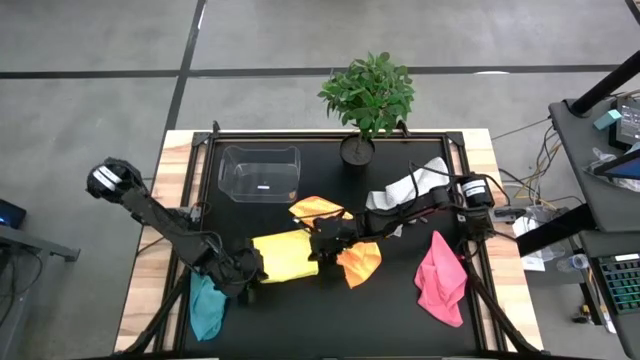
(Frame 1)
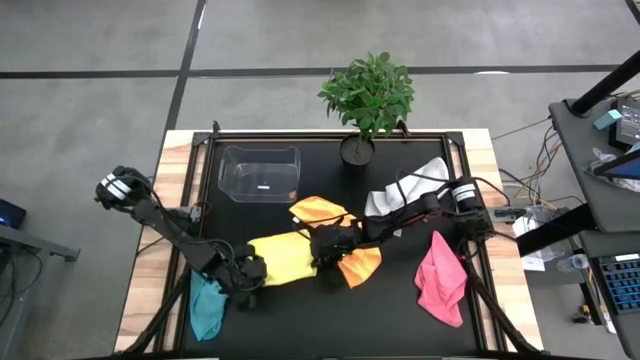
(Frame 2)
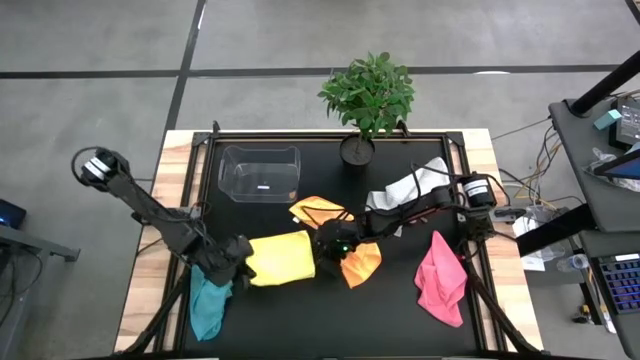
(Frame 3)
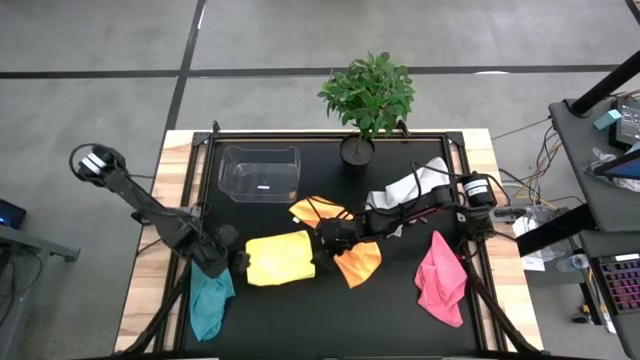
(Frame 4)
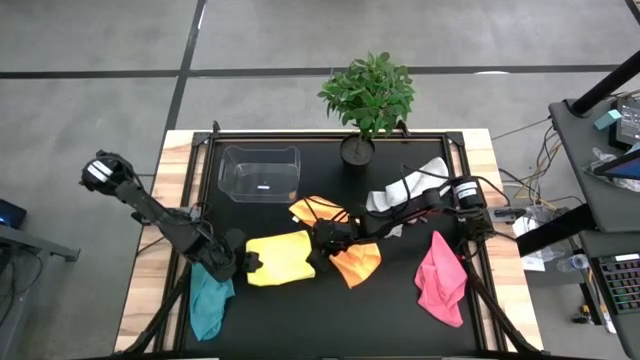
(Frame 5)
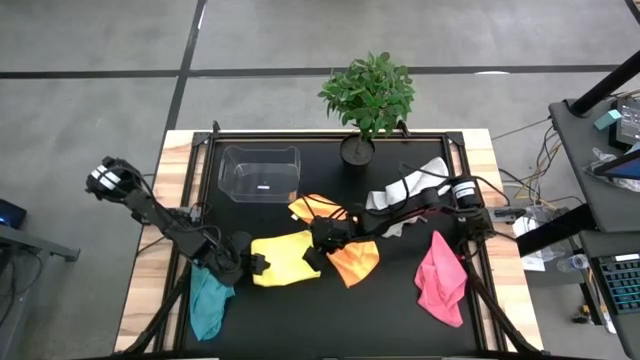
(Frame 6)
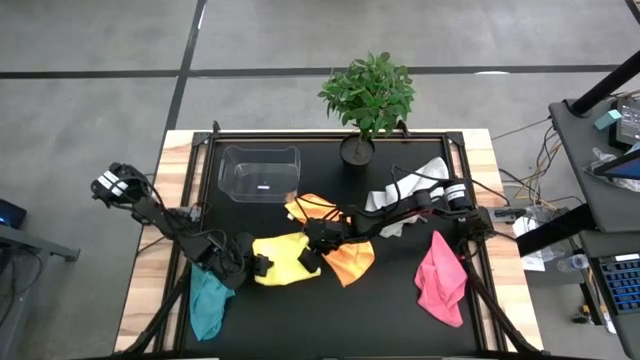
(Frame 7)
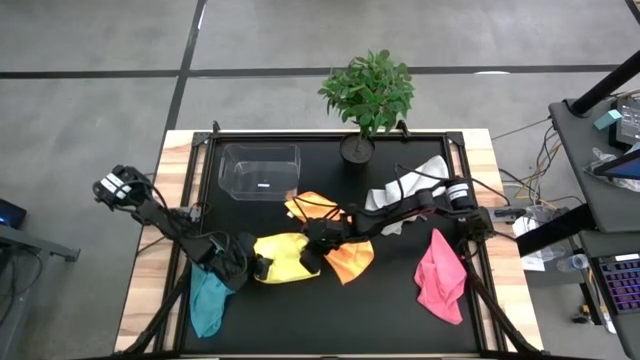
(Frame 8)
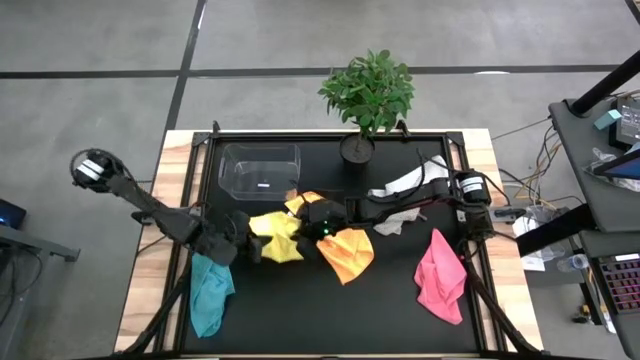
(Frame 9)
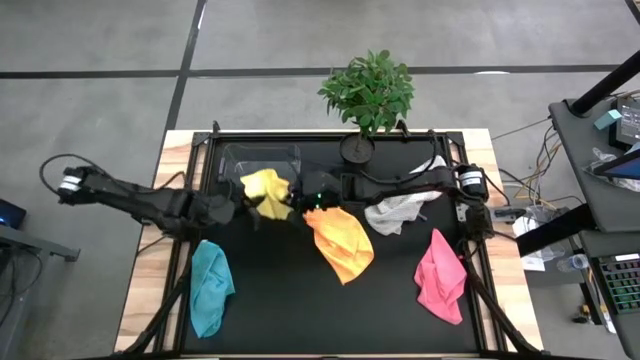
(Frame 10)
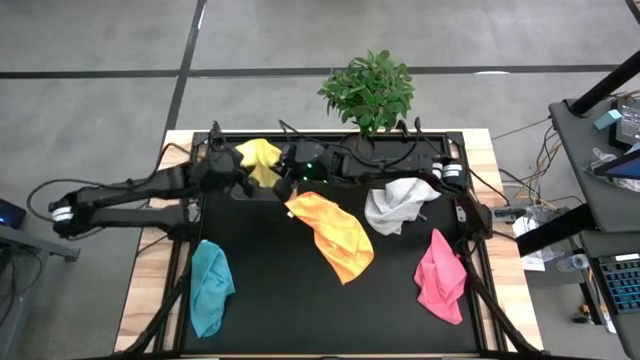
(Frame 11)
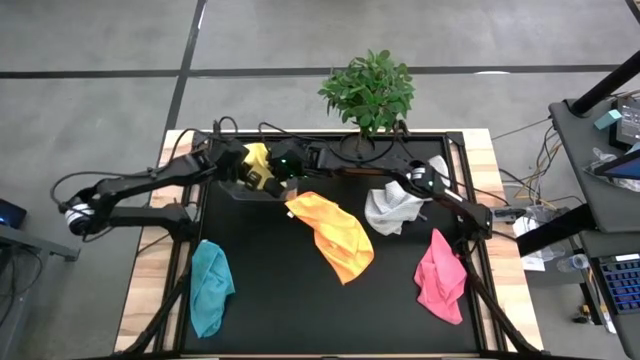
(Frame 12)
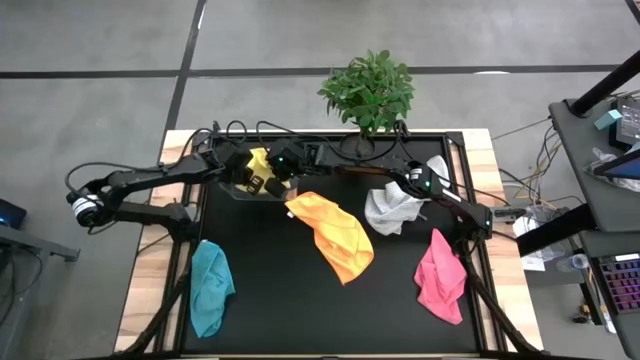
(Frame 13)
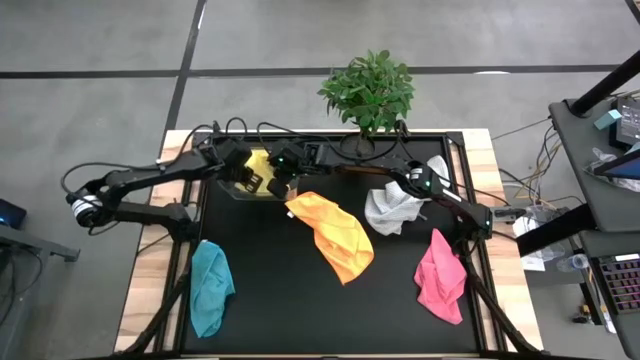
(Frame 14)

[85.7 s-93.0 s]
Task: Fold microfiber towels
Put the yellow towel into the transparent bin

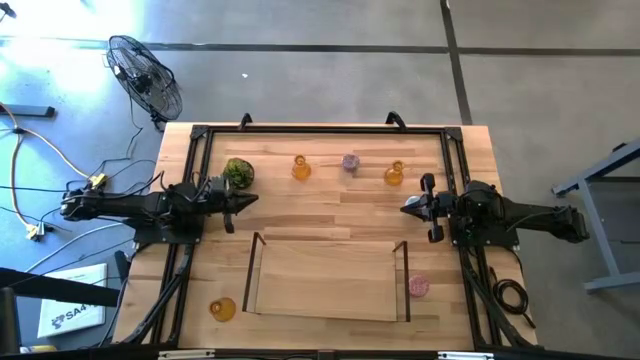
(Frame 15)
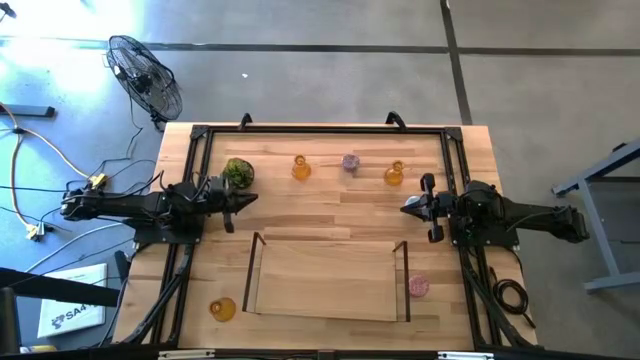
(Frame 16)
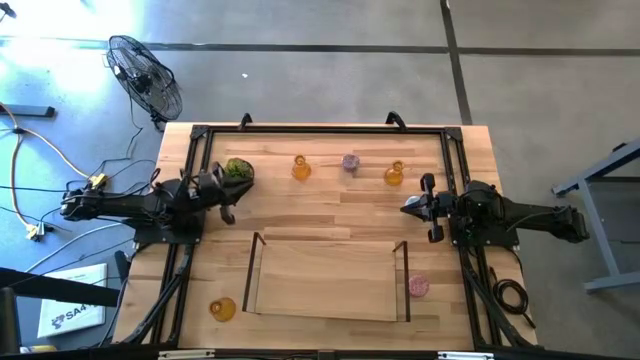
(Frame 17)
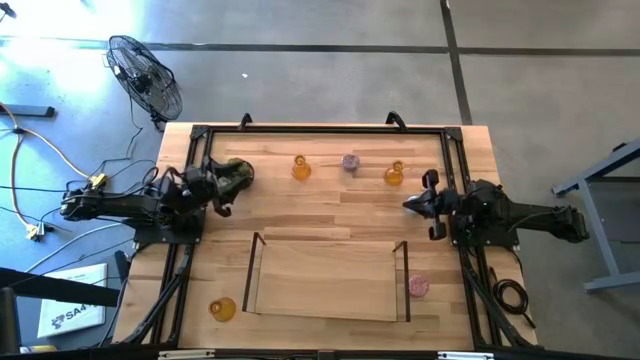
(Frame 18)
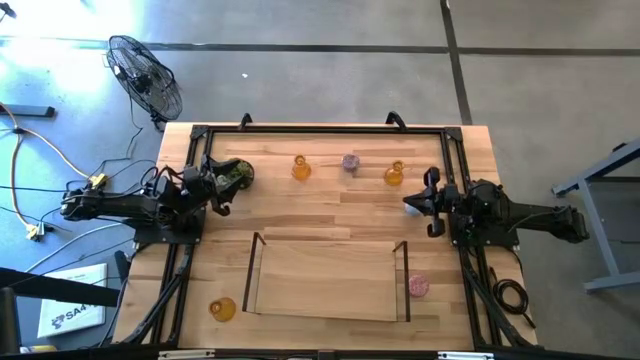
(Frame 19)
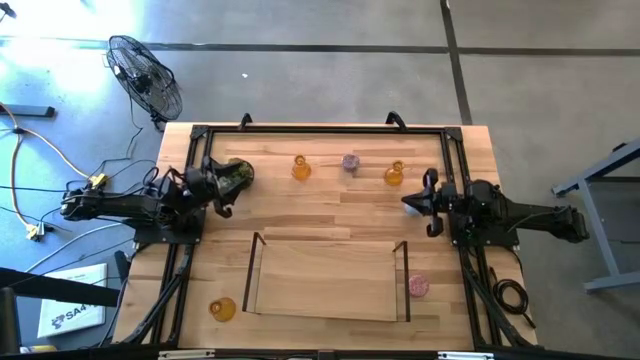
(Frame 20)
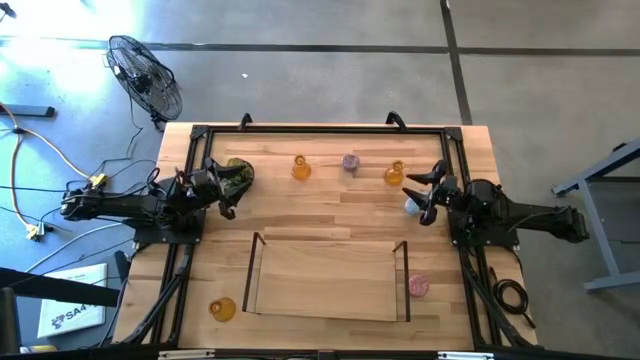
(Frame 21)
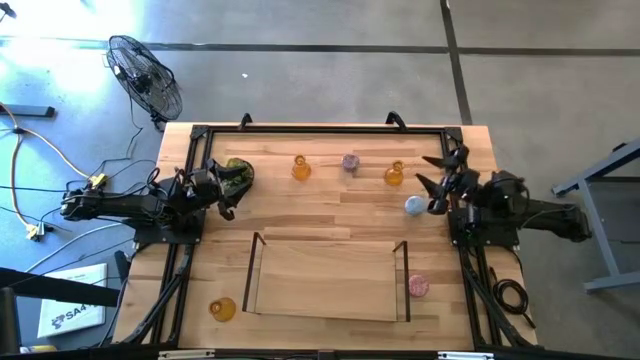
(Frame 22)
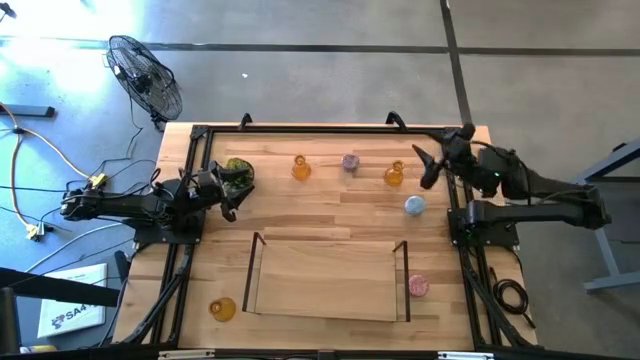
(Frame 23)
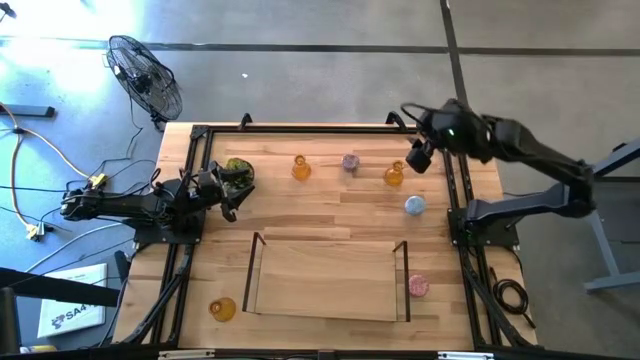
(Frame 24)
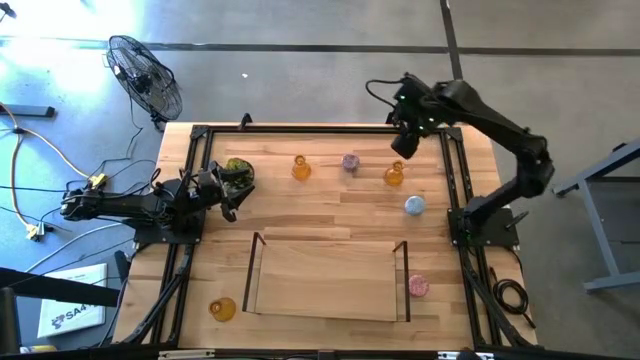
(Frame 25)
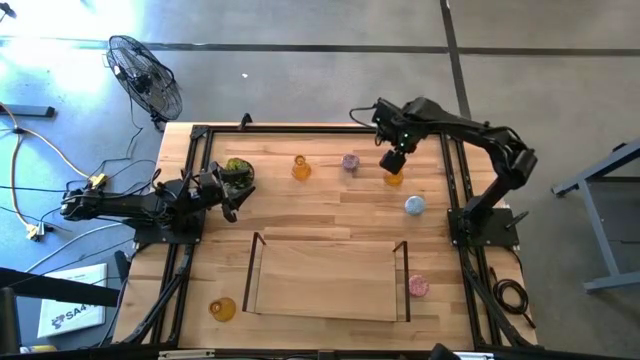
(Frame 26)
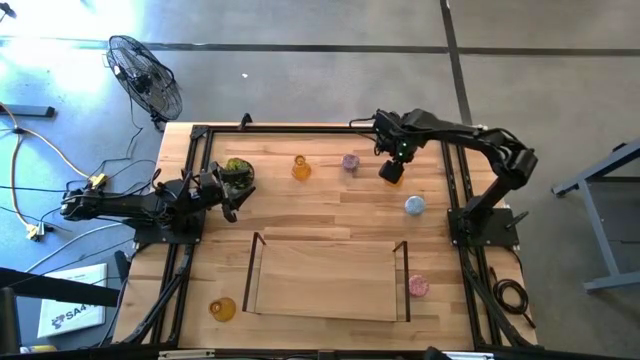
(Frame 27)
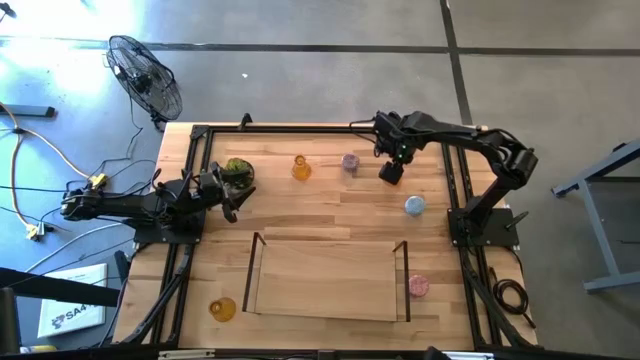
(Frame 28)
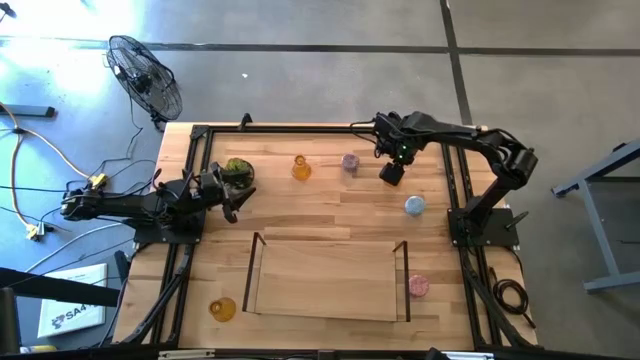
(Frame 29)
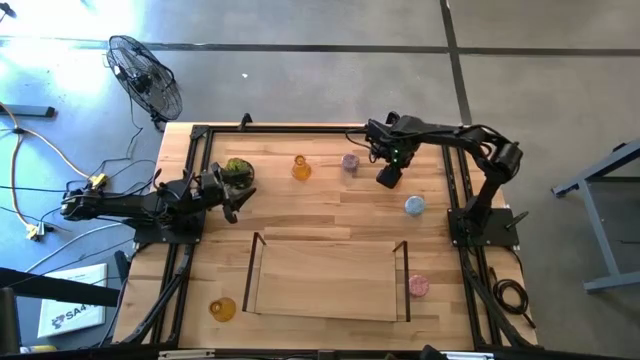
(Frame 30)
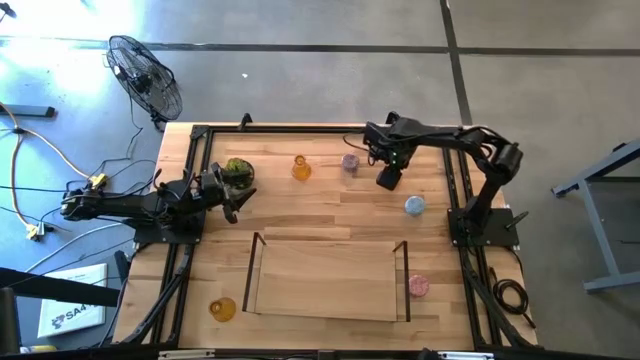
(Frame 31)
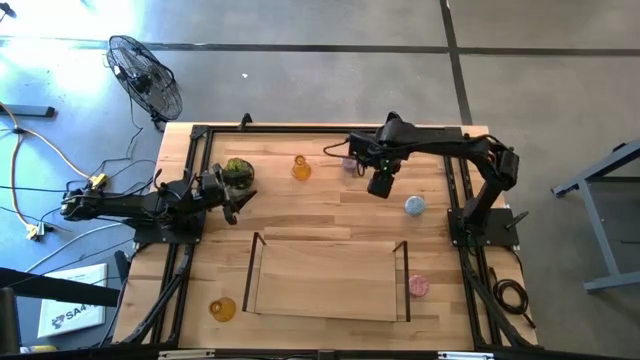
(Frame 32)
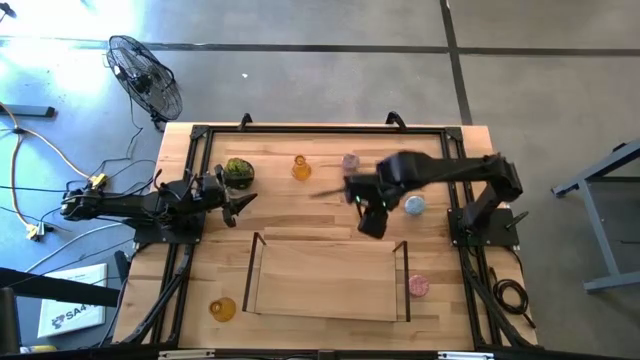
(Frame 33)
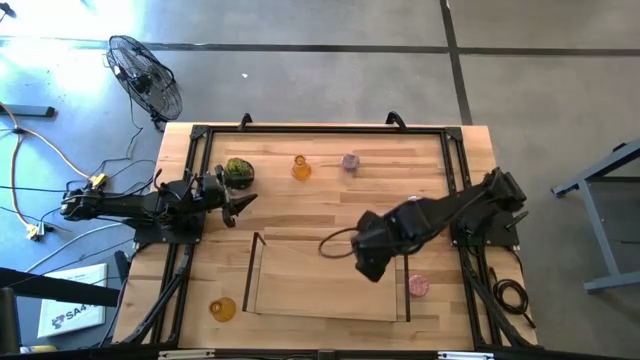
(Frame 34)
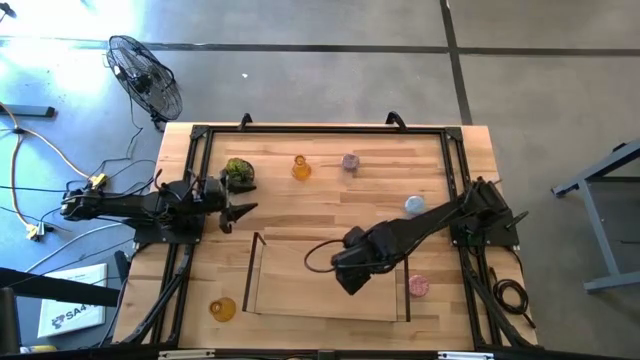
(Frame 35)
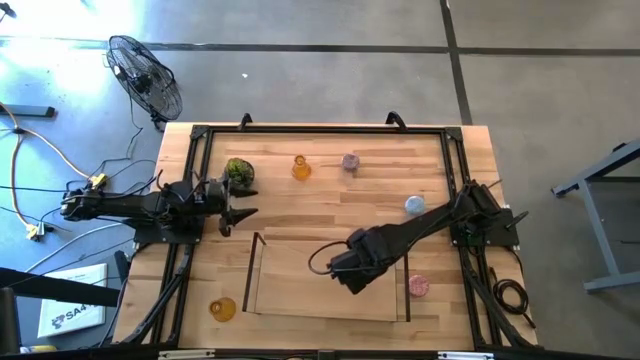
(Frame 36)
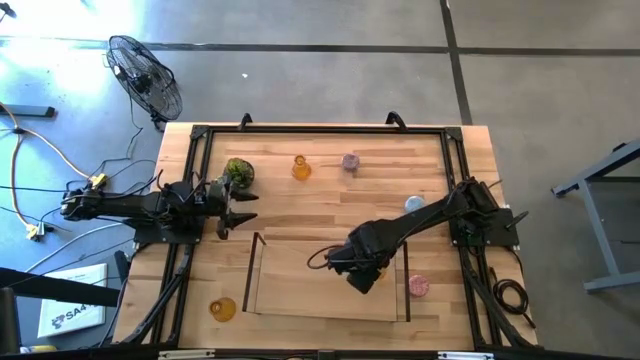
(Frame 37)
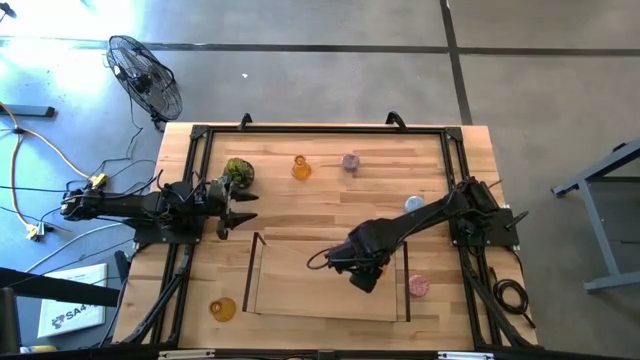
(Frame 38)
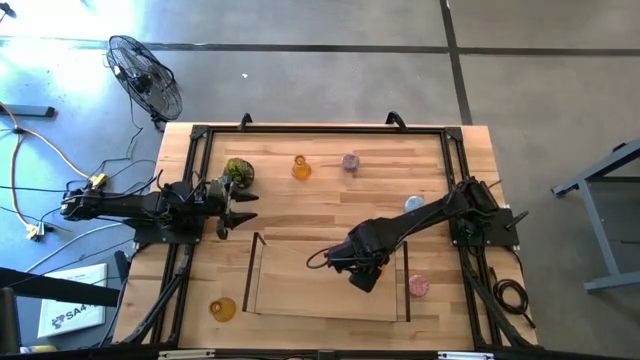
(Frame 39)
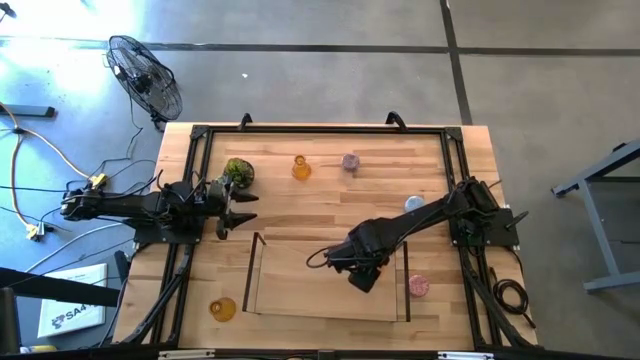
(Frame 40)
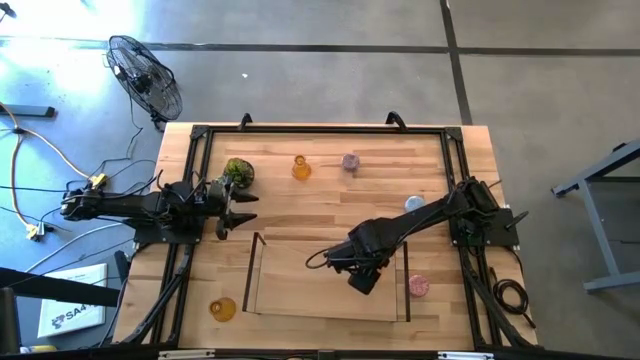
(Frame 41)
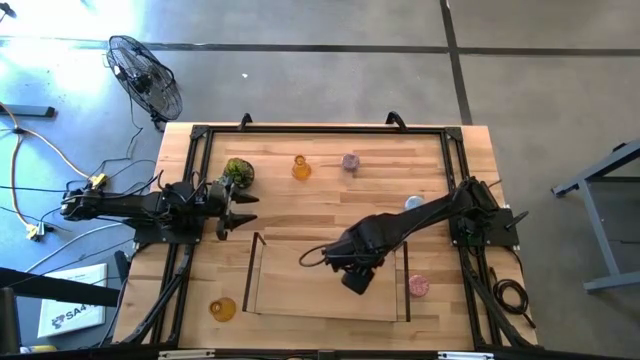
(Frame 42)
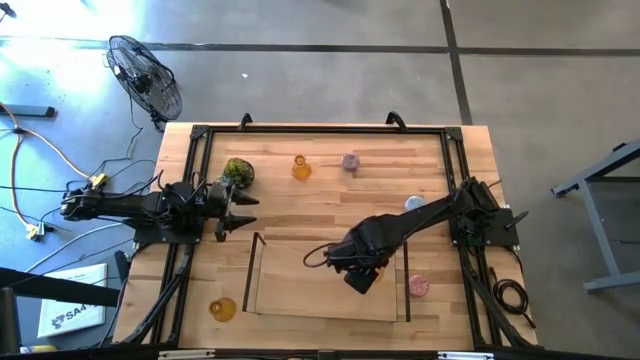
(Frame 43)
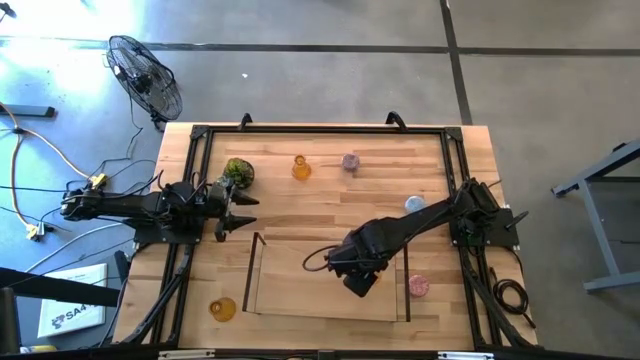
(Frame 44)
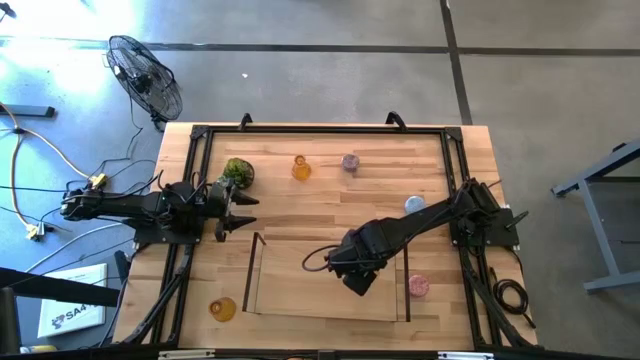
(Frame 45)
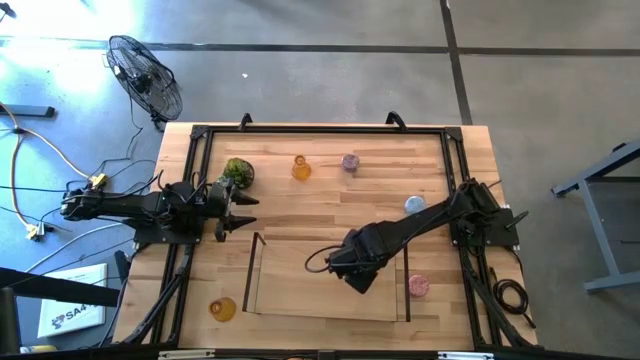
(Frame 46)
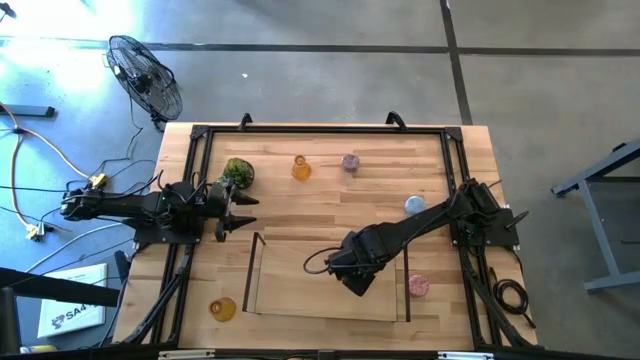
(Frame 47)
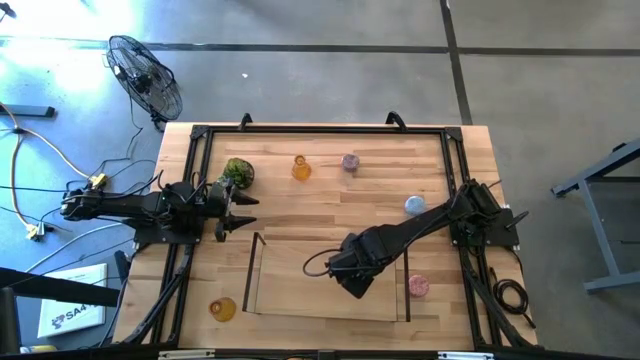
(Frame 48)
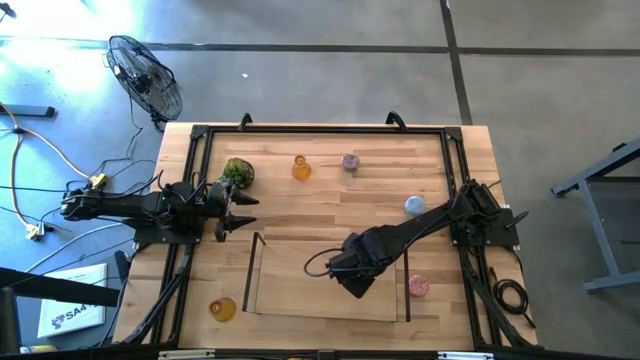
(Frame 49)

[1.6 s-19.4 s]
Task: Pick & Place candle stick holders
Put the right brown vase candle holder on the shelf
